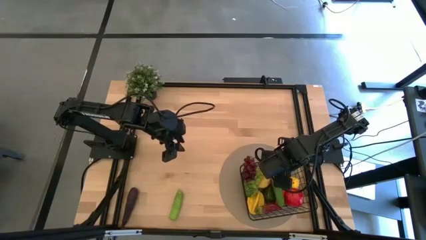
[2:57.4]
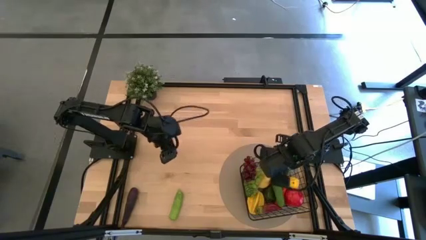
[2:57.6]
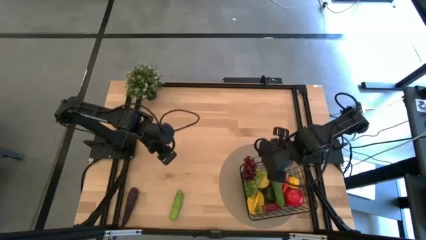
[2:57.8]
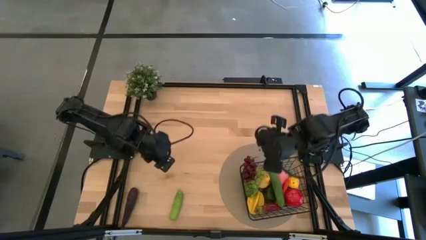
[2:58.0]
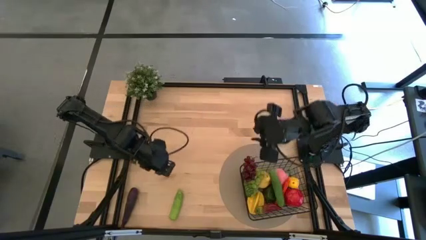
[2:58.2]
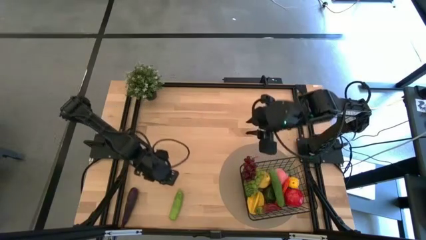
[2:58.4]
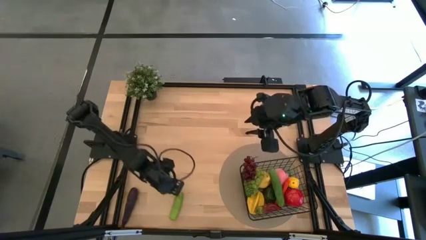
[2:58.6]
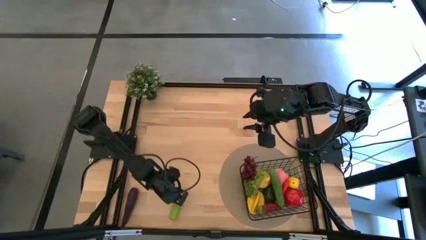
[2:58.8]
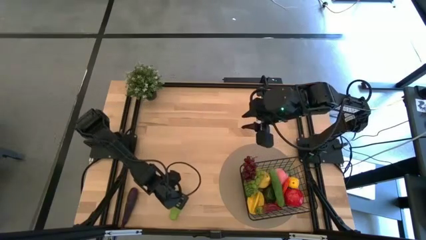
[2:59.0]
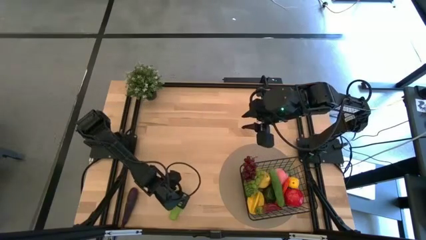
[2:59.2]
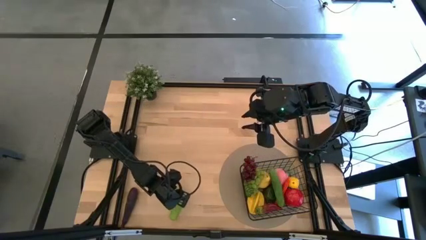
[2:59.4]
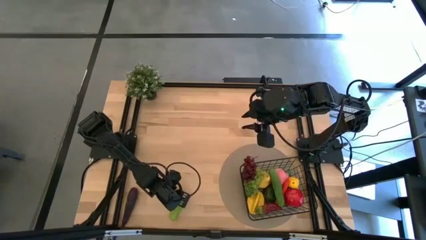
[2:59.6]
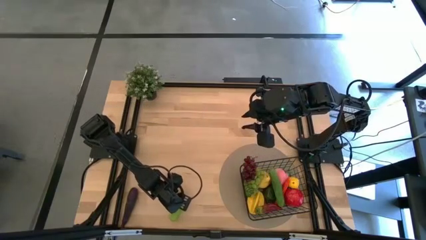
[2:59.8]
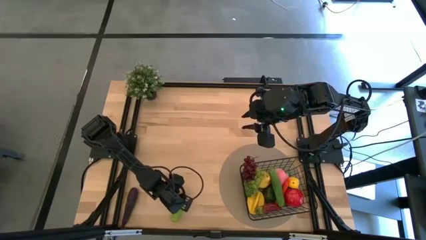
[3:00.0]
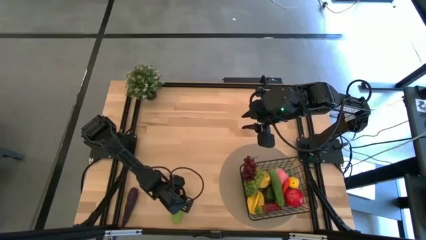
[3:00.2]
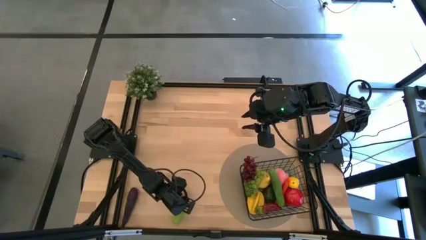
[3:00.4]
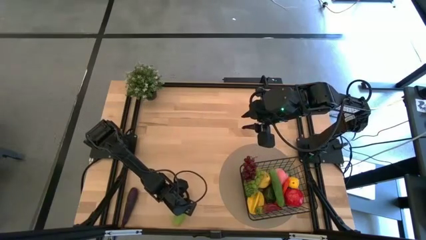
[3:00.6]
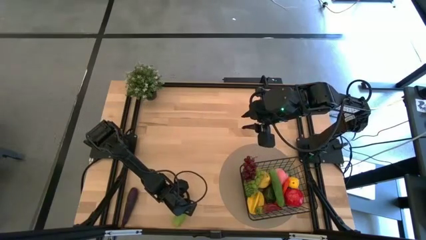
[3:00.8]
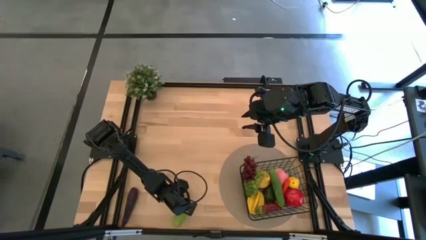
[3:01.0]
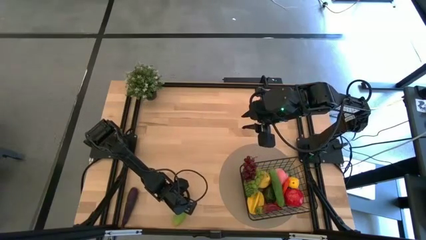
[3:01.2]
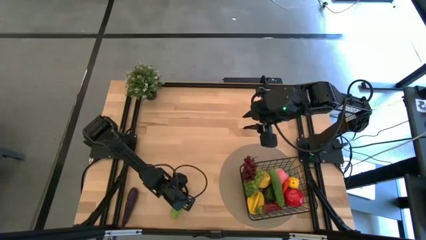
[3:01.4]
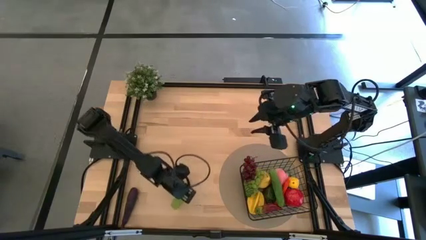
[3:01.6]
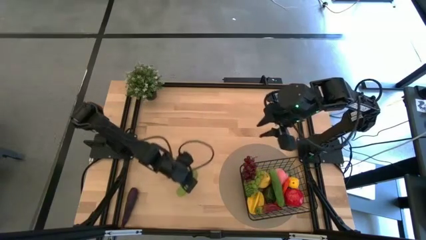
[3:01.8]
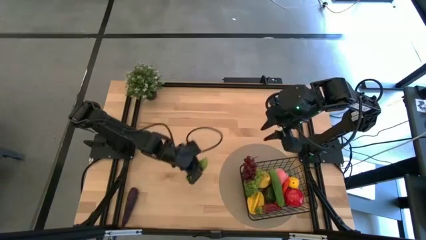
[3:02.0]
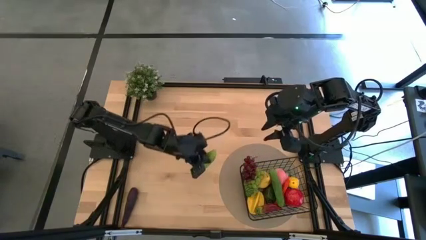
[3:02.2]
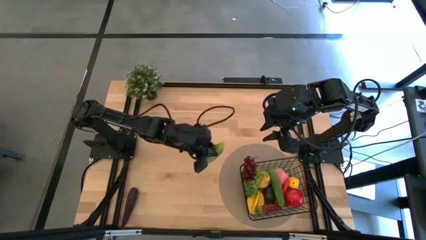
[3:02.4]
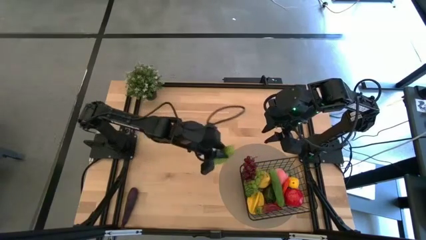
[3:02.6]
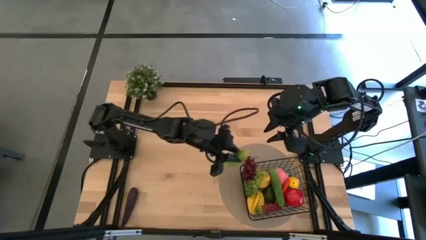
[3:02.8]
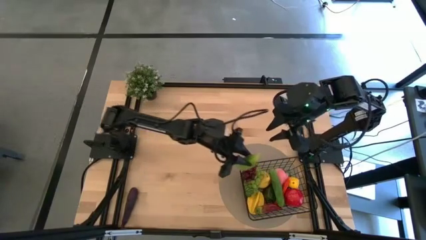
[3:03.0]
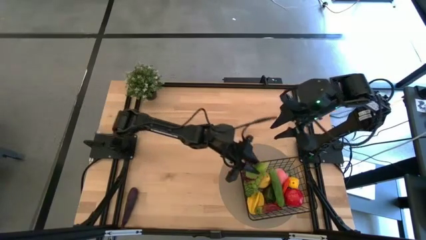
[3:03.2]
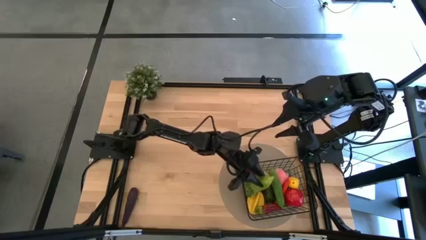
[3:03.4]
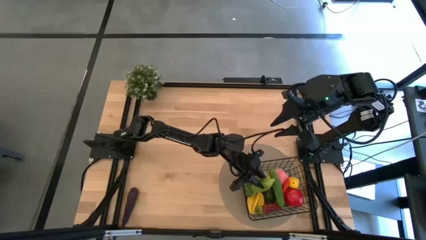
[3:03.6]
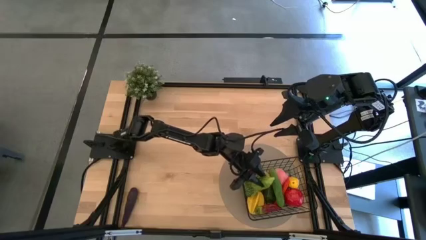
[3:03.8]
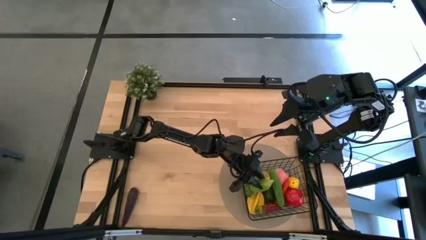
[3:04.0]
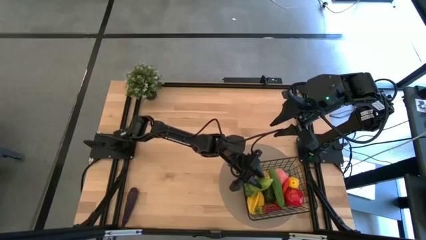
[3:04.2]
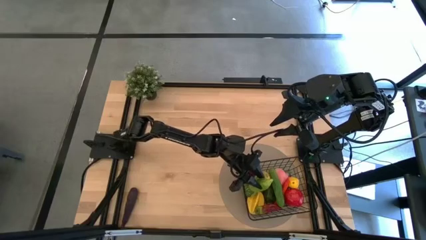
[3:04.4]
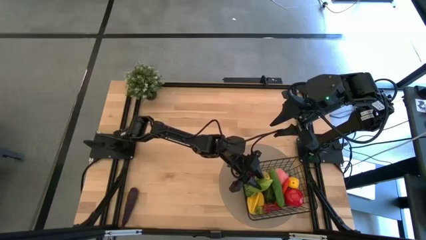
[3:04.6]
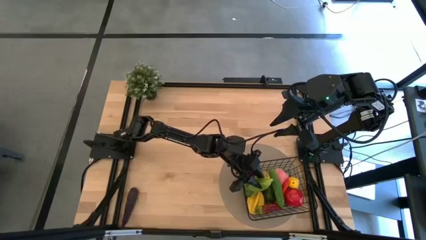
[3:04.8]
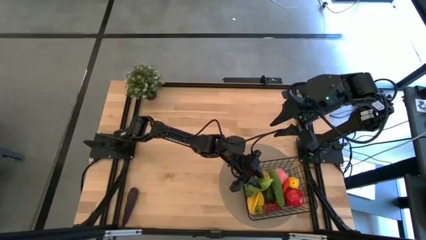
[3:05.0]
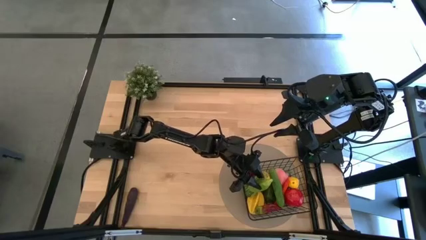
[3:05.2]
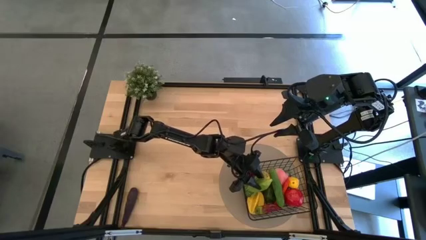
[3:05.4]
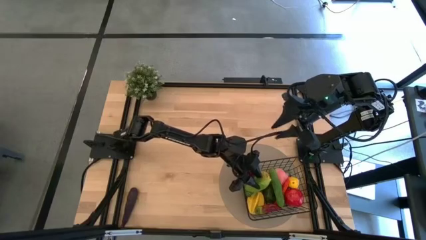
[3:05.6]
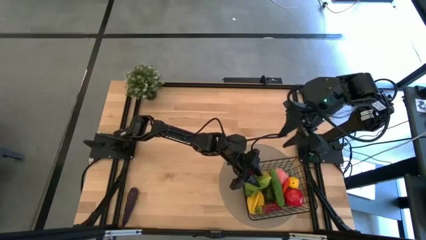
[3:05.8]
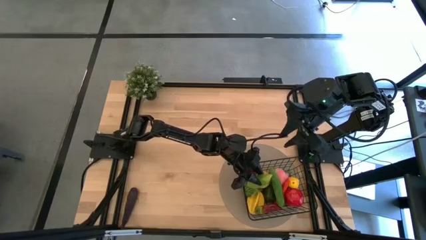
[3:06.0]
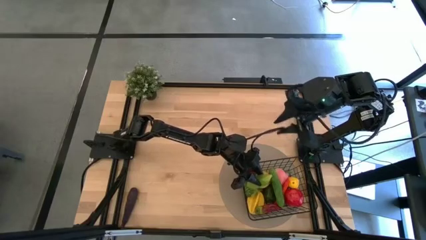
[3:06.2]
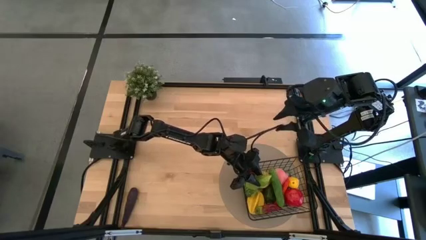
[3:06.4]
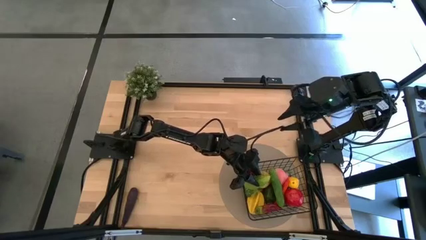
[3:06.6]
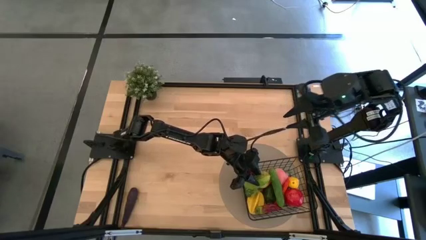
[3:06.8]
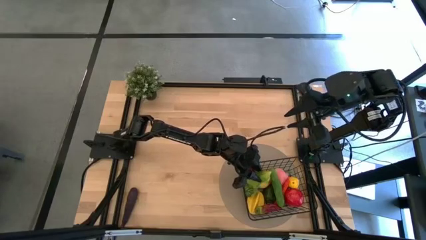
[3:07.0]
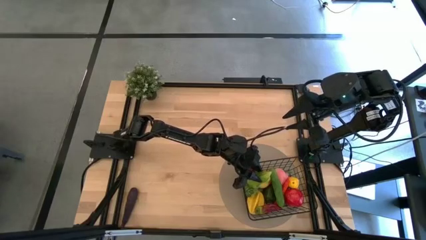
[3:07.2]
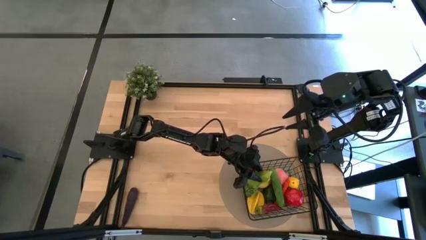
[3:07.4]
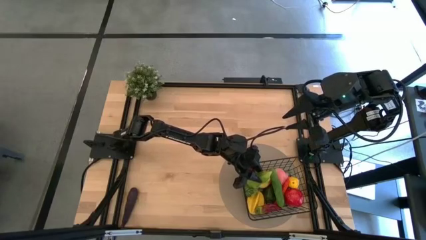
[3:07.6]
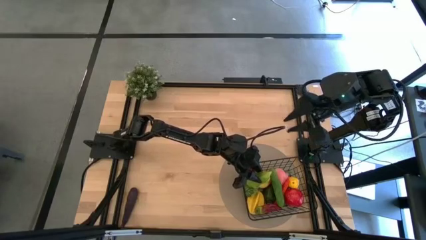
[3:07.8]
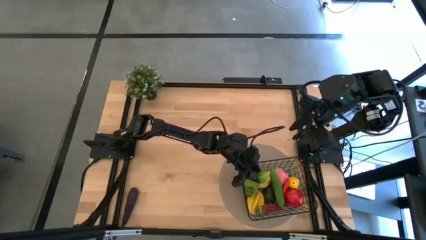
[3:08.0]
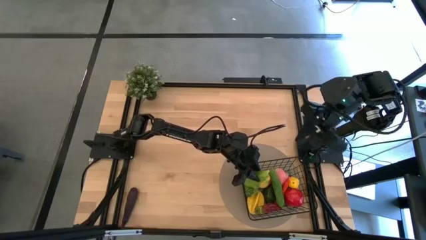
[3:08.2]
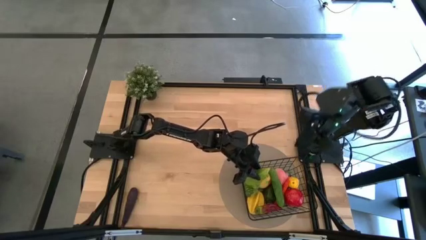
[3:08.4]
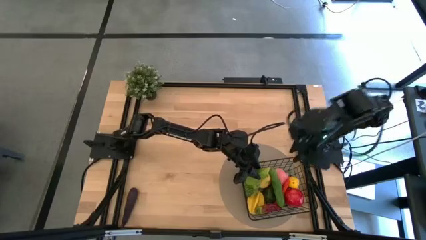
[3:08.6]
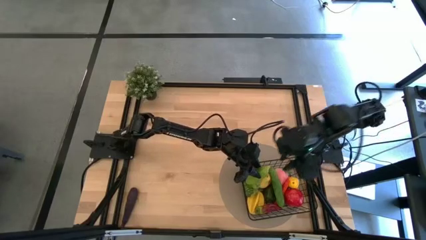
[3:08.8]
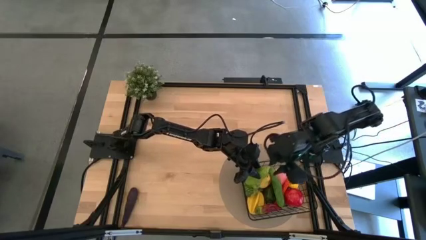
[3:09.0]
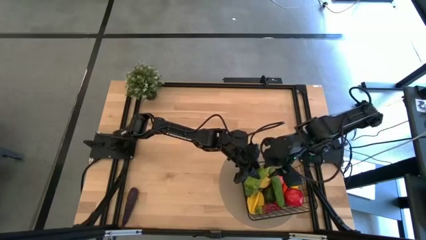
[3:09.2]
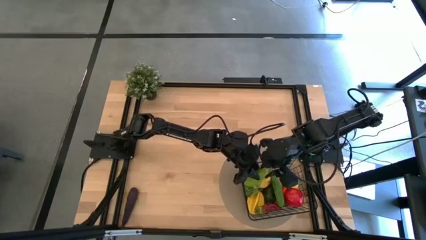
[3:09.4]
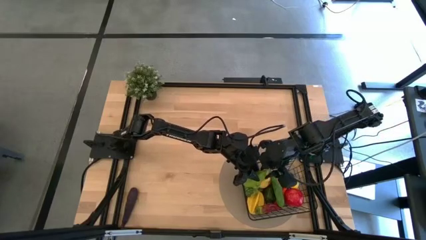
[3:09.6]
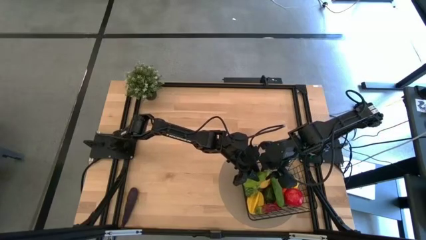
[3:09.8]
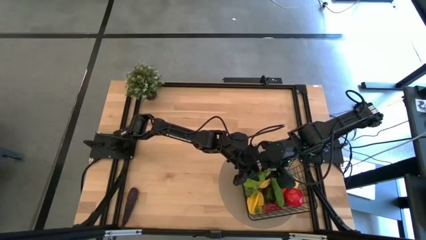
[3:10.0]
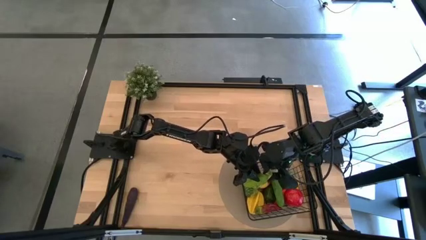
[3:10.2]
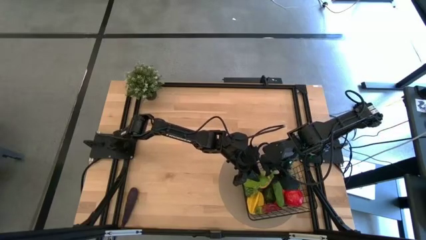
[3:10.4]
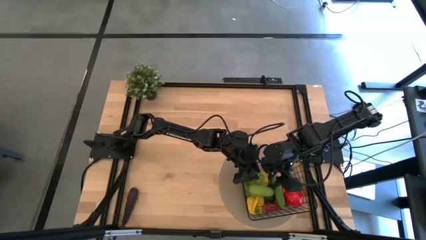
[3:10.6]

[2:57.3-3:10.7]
Task: Build produce basket
Put the cucumber into the wire basket

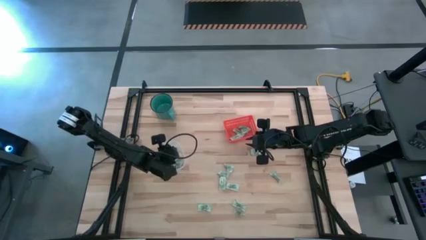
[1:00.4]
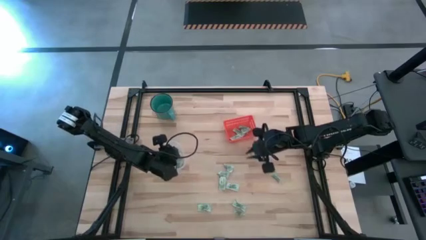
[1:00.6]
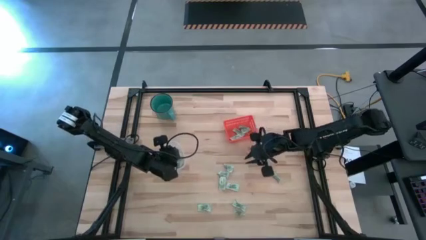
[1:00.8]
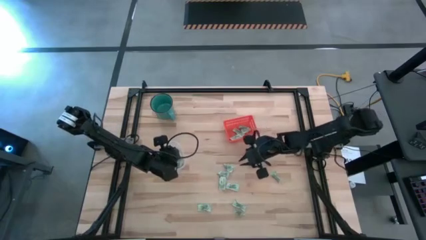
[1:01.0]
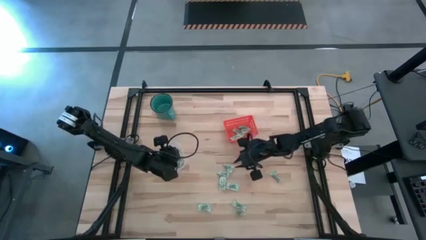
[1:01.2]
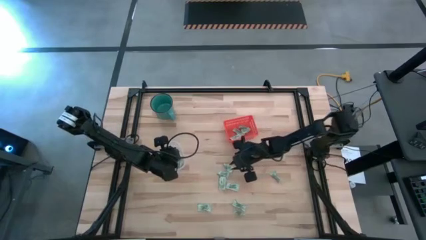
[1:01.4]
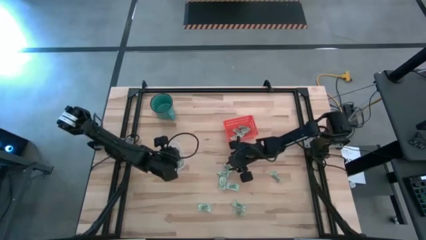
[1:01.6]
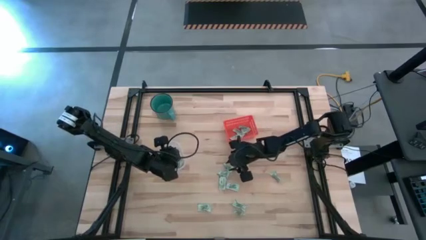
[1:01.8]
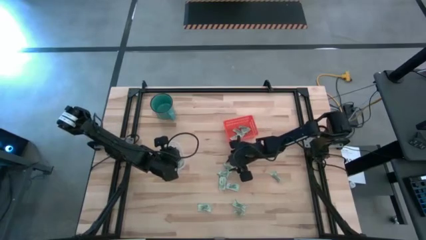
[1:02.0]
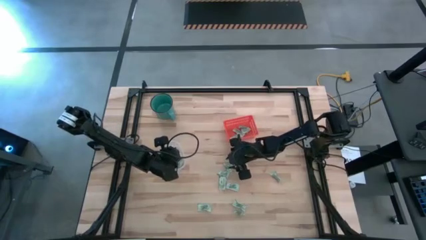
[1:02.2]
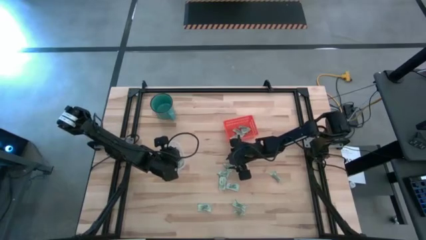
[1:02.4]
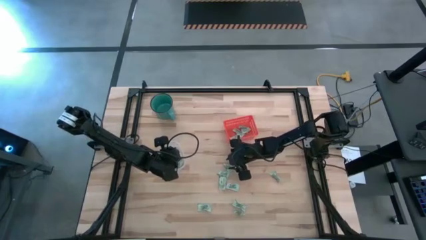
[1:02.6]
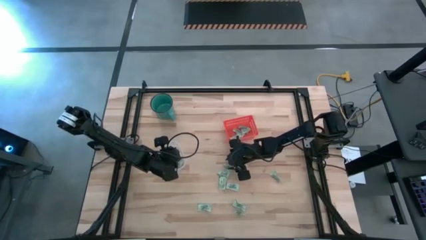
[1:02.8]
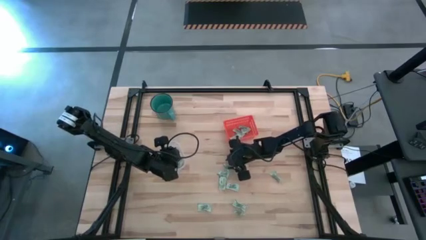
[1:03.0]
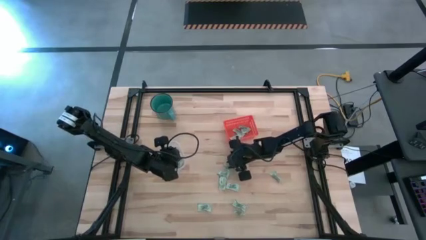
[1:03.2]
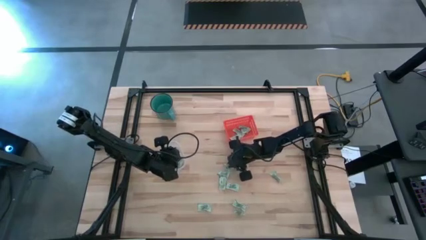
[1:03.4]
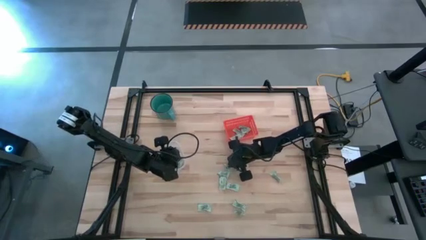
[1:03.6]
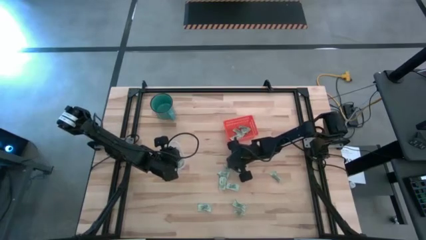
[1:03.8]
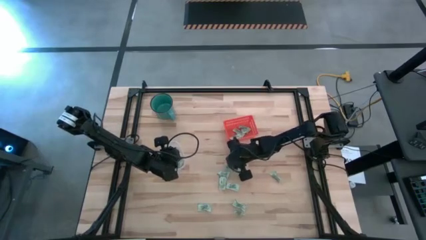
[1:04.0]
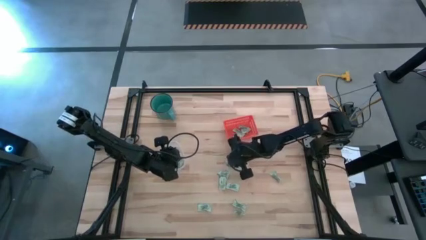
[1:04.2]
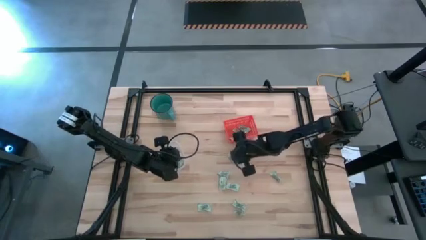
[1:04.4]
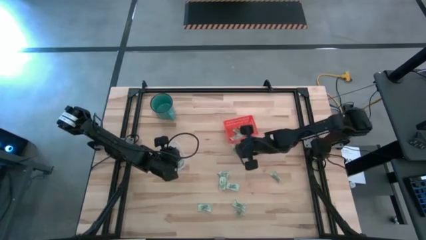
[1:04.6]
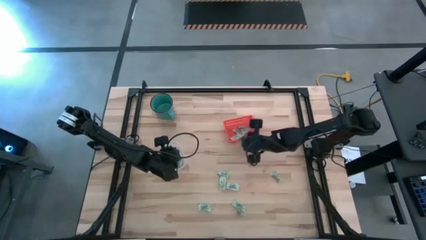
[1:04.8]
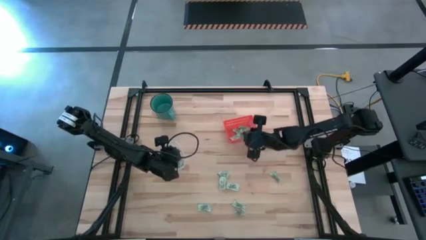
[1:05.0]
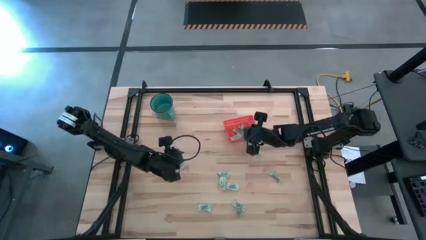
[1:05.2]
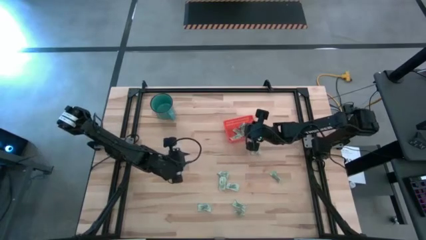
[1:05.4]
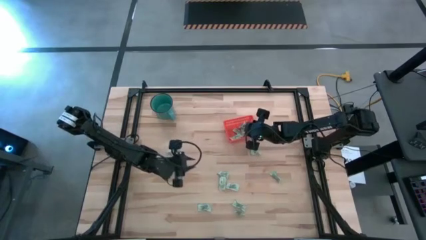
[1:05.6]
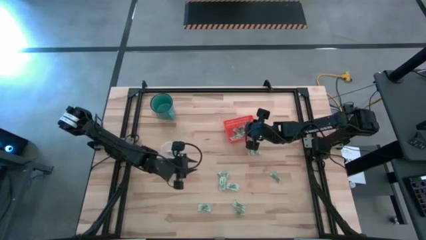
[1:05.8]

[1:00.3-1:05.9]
Task: Pick and place items into bin
Put the light green stevia packet into the orange bin
